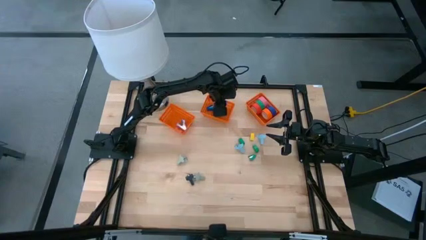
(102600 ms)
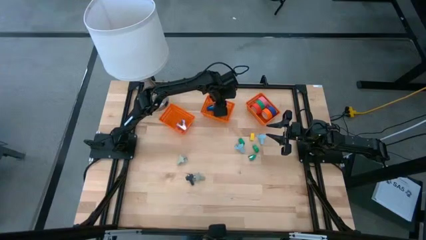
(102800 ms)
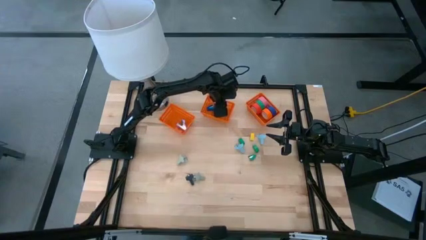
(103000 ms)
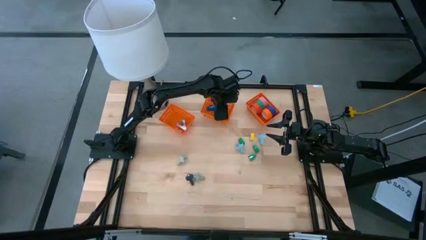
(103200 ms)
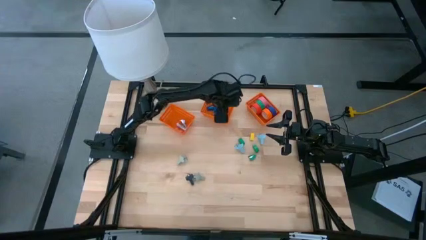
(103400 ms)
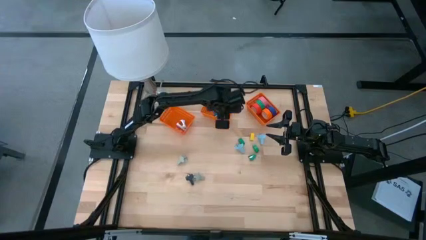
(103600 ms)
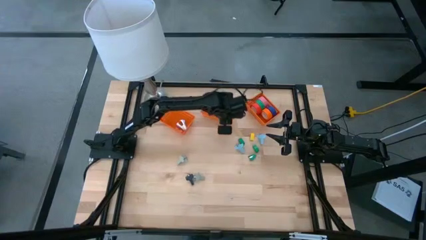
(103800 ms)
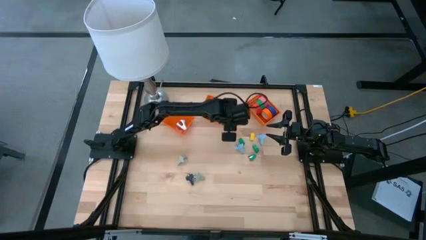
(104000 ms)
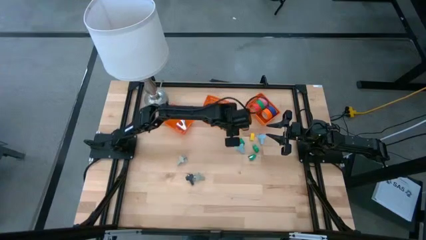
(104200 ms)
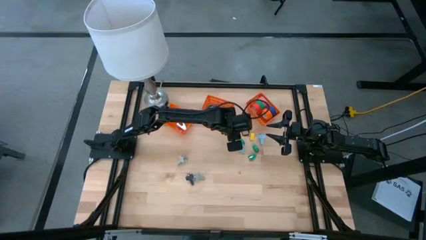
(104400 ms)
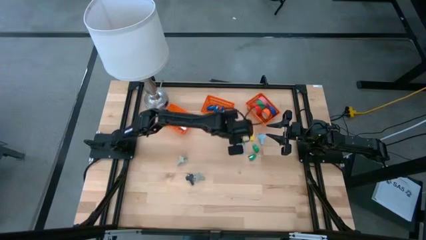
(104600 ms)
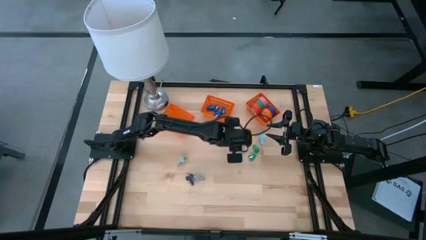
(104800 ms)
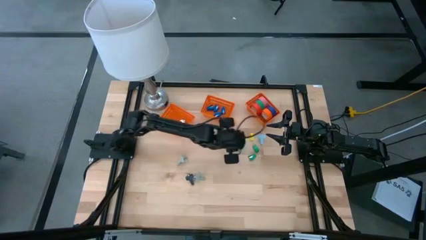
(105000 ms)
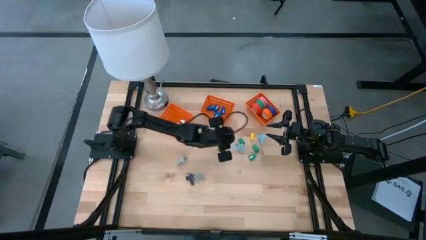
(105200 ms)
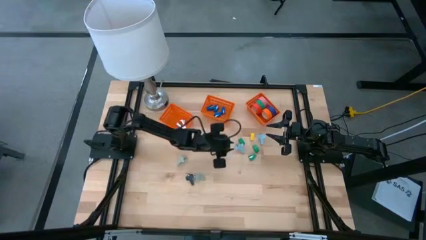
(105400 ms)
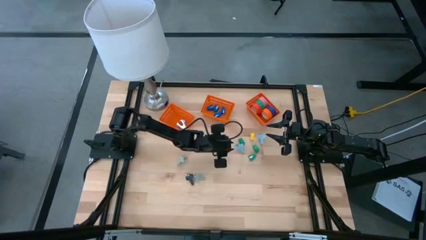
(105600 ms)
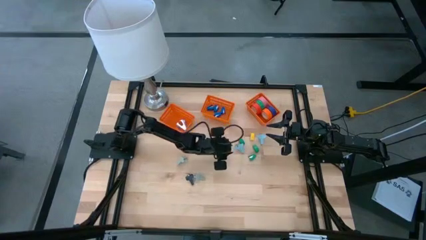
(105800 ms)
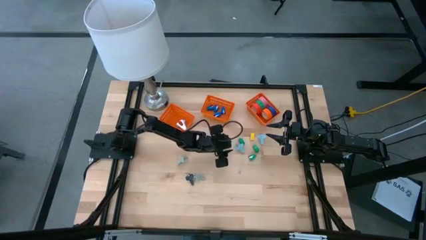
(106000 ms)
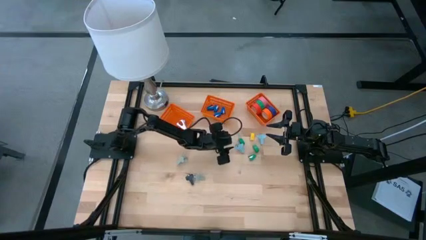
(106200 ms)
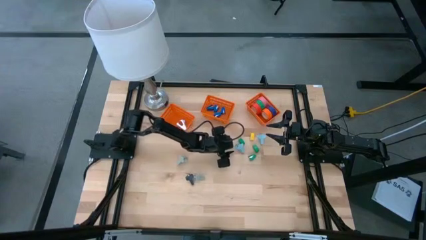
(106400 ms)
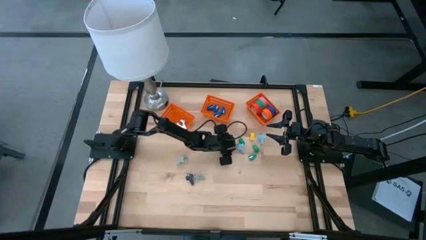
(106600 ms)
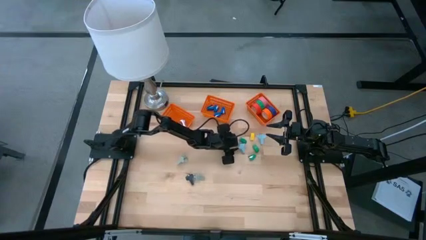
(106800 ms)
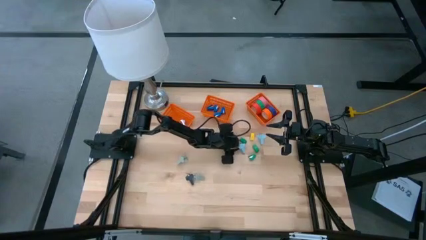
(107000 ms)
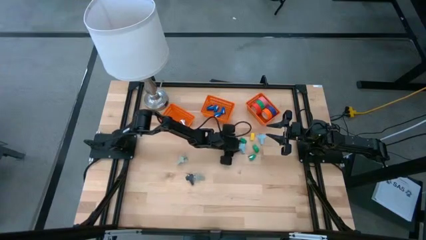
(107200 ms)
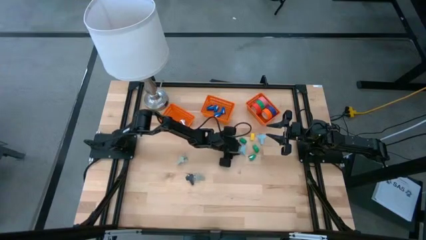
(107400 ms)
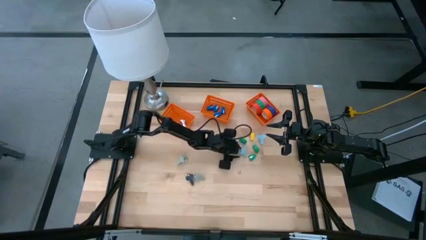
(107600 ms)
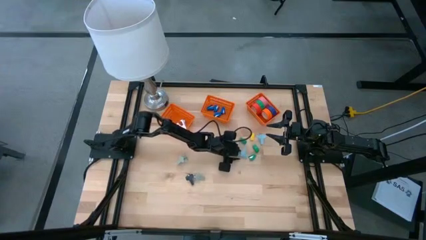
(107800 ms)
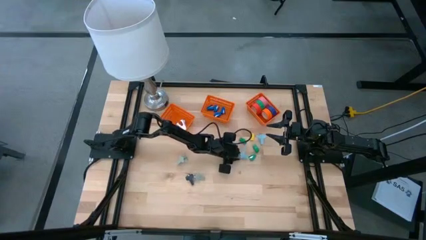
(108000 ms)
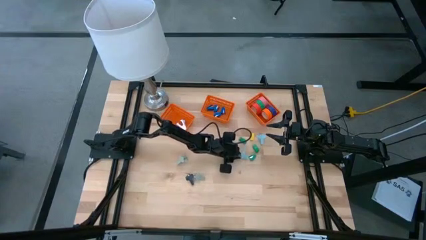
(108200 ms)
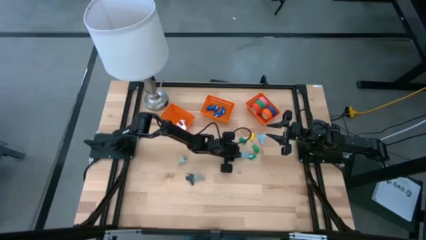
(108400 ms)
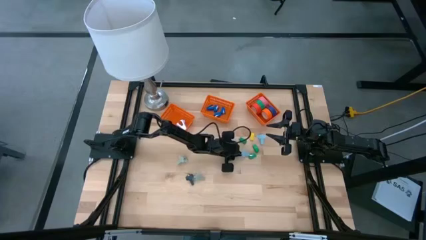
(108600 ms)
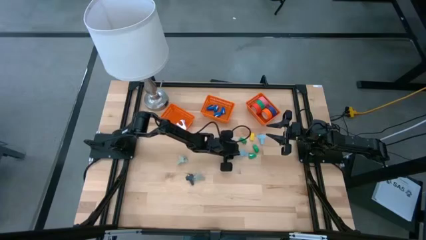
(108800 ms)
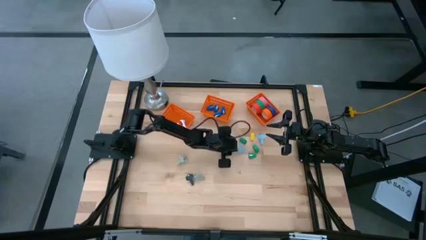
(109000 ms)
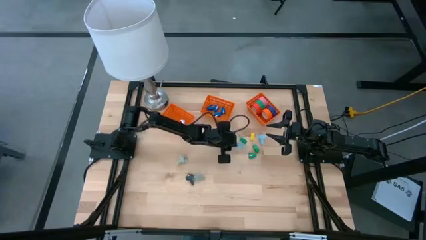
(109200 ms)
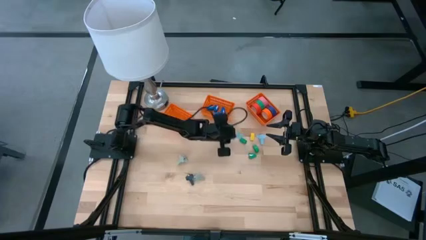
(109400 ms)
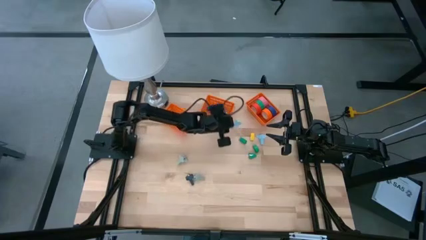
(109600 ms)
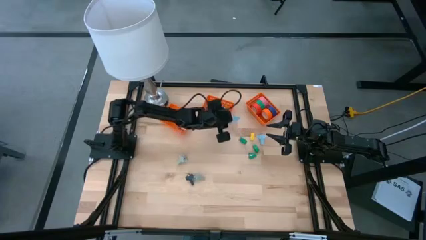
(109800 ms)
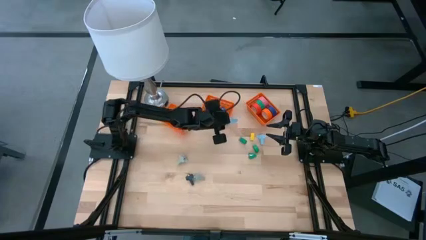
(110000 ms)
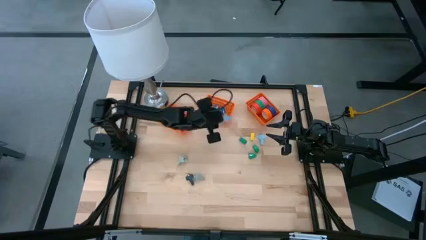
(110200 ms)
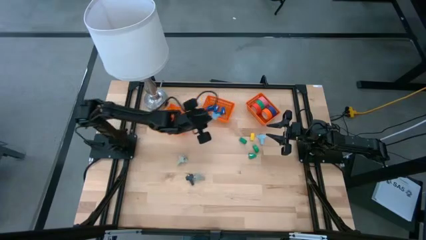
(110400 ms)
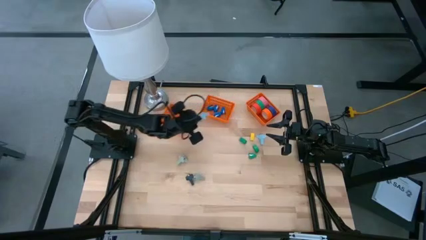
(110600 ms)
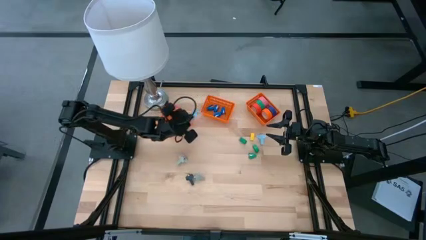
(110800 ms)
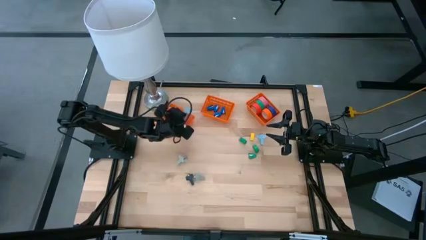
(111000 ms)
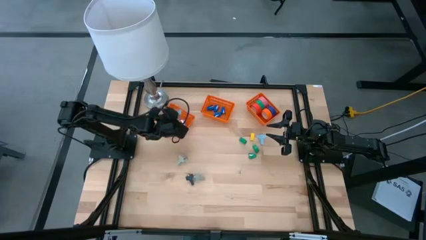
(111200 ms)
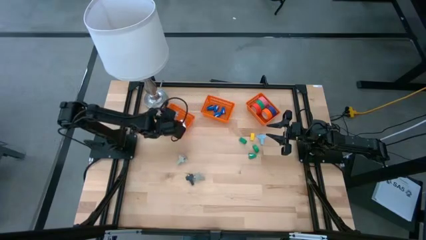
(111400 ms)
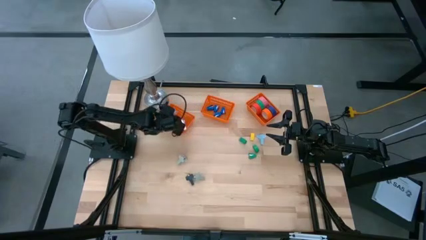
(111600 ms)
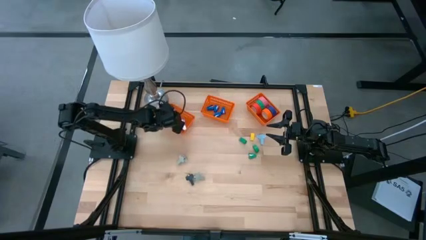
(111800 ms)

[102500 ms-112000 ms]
Task: Pick and place Stapler, Stapler remover, tape
Put the light blue staple remover into the left orange bin

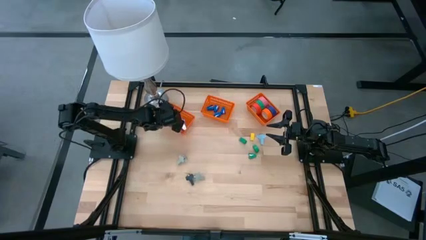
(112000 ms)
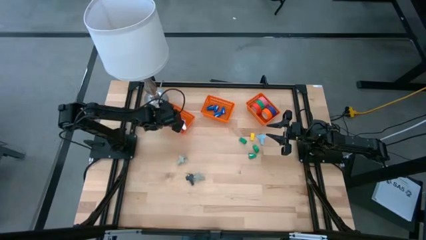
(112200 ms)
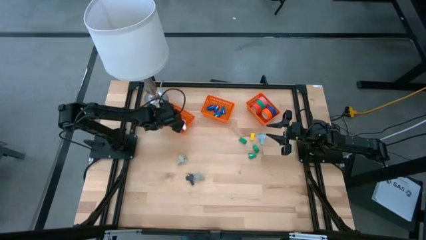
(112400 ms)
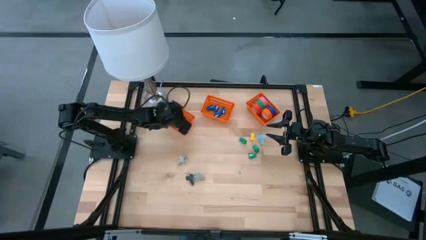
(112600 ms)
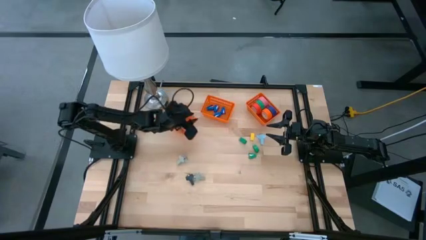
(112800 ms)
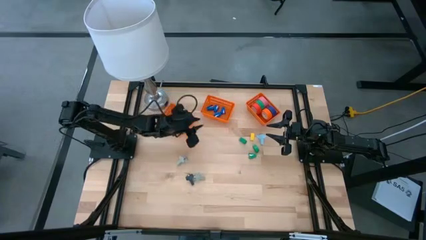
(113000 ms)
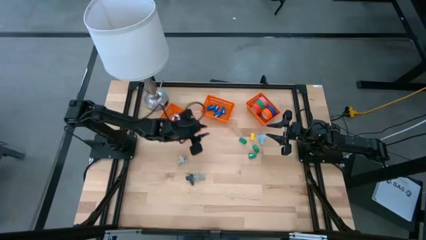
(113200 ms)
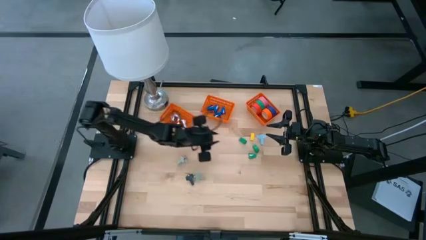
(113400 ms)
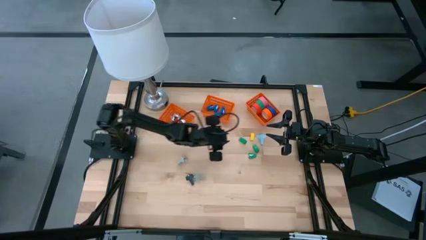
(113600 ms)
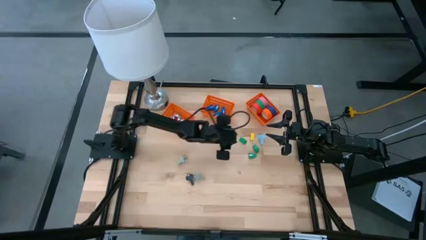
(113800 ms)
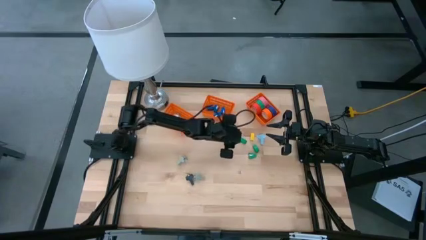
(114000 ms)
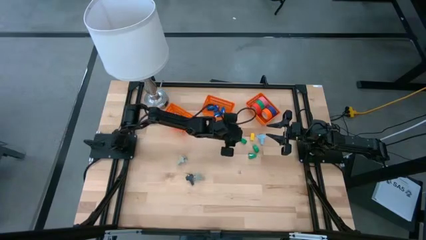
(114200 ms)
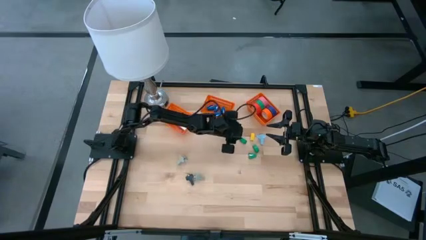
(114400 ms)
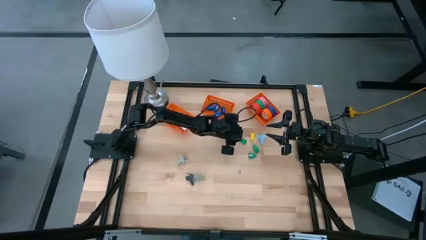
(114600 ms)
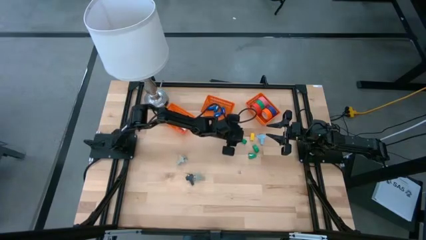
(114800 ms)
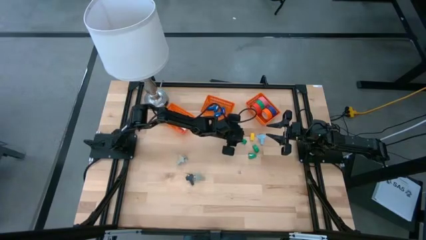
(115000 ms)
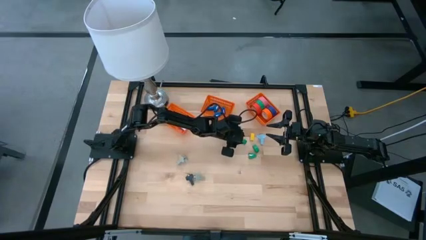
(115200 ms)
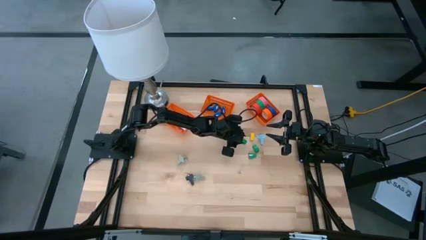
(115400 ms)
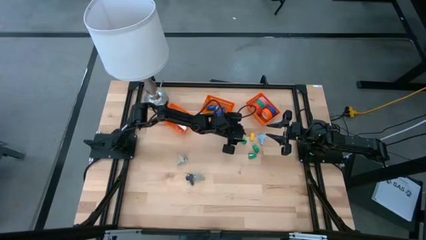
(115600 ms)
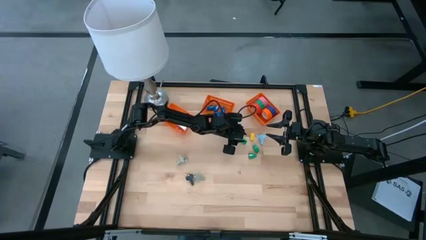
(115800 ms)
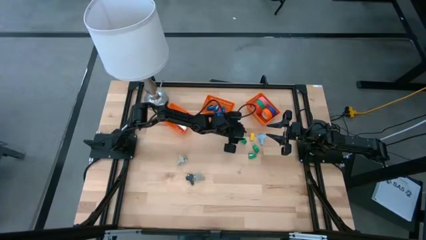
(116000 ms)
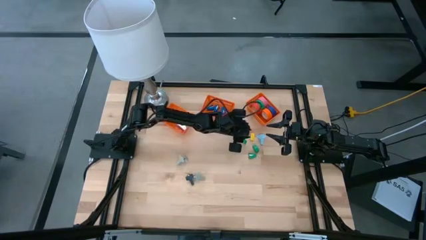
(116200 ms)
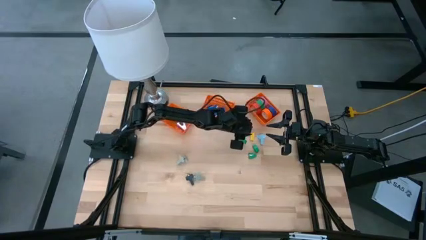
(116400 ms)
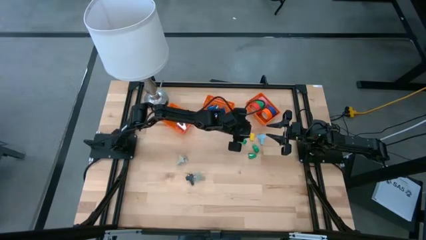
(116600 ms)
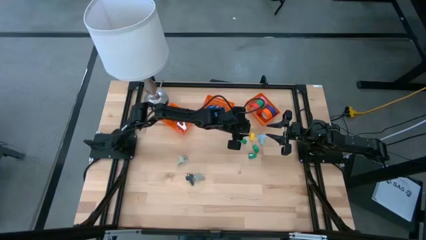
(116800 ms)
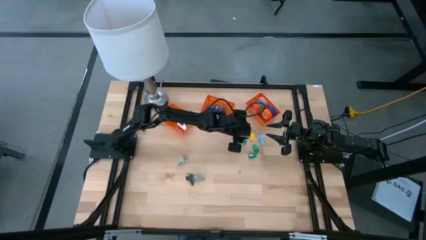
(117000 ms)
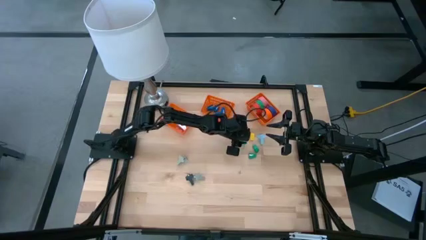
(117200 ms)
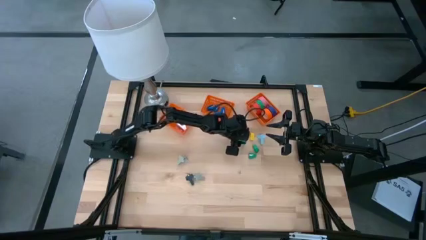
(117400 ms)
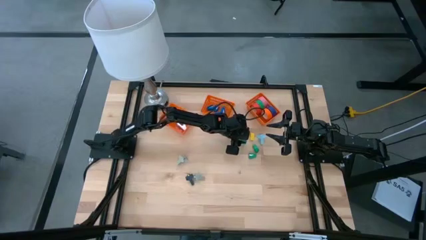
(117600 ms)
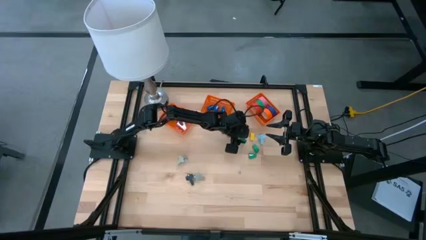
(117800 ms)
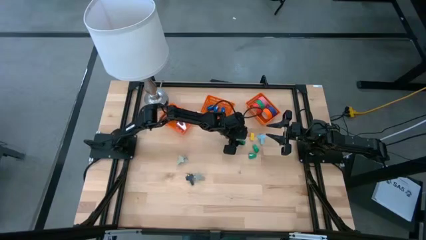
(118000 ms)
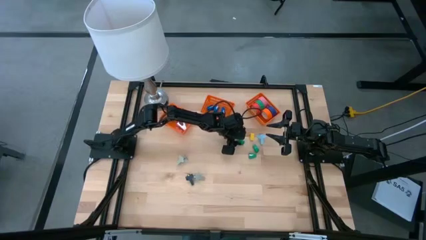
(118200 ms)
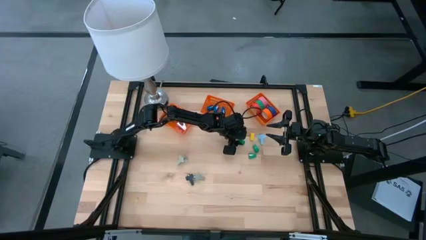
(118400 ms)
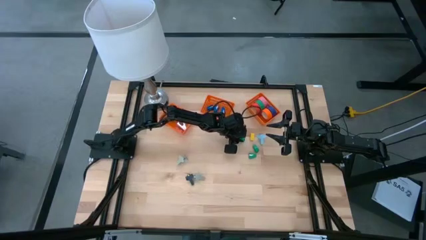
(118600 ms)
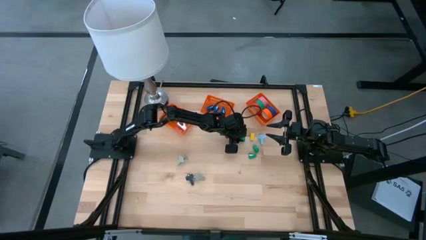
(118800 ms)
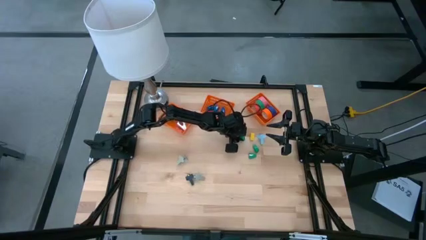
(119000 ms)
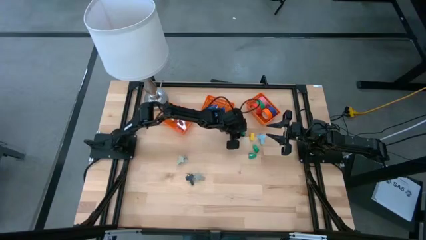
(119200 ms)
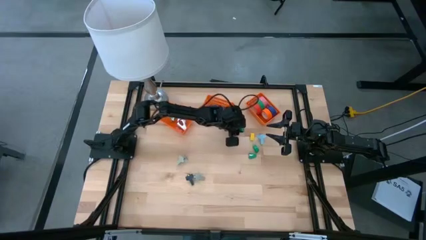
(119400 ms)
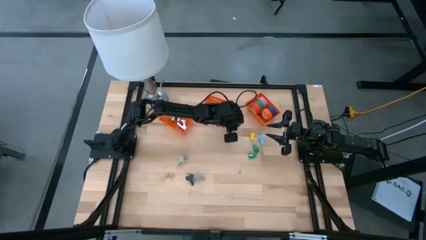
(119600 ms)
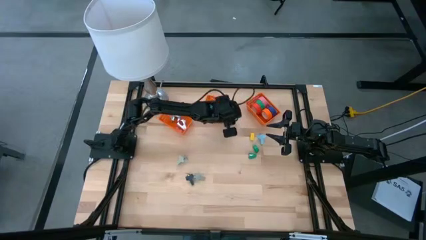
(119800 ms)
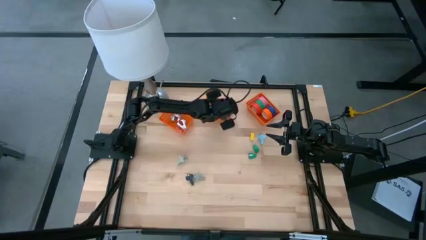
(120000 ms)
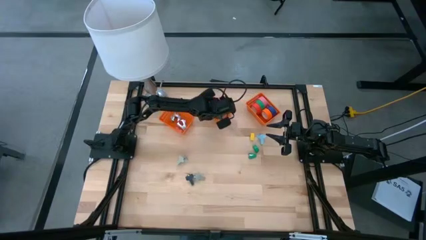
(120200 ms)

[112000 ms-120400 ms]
Put the green stapler into the middle orange bin
